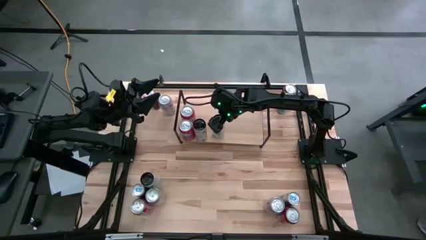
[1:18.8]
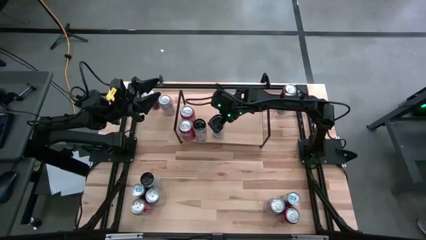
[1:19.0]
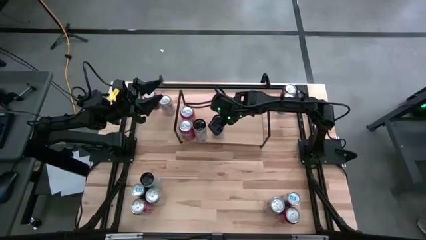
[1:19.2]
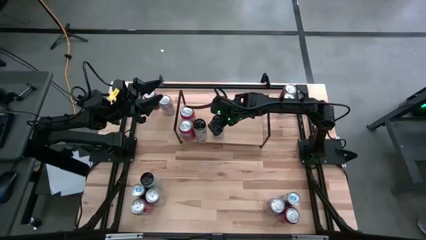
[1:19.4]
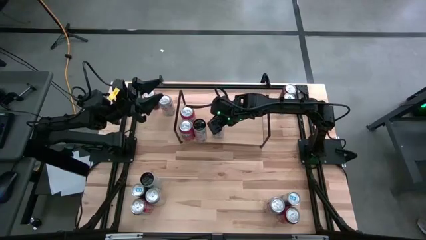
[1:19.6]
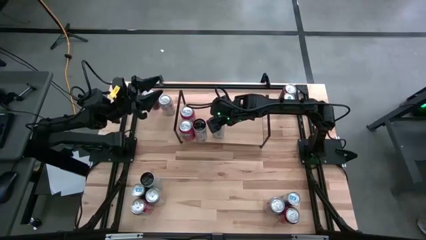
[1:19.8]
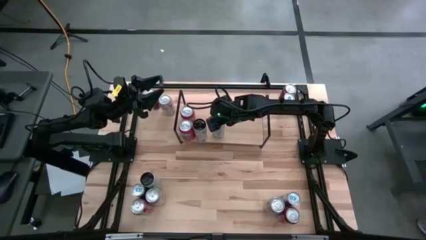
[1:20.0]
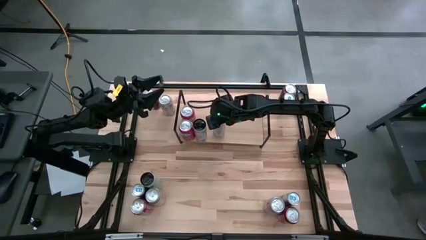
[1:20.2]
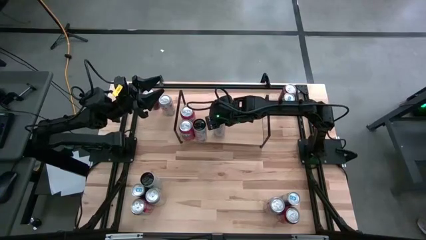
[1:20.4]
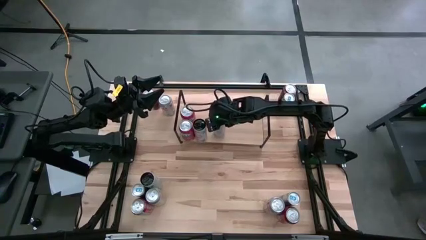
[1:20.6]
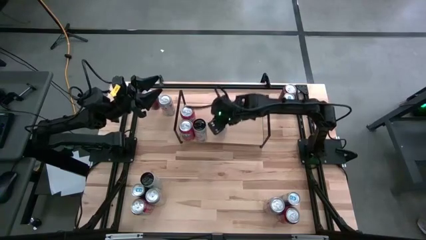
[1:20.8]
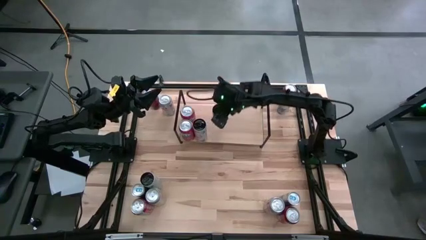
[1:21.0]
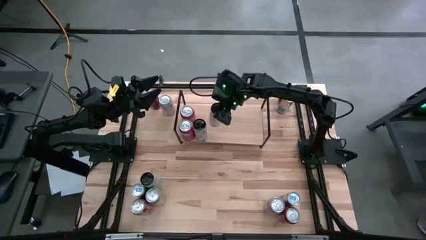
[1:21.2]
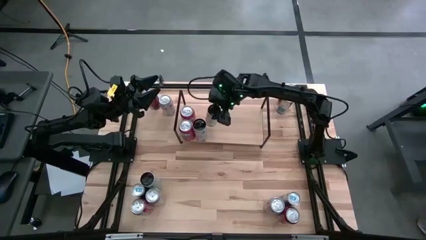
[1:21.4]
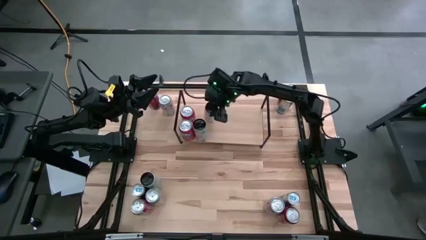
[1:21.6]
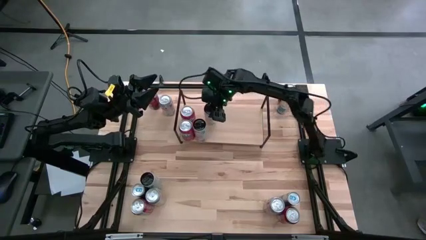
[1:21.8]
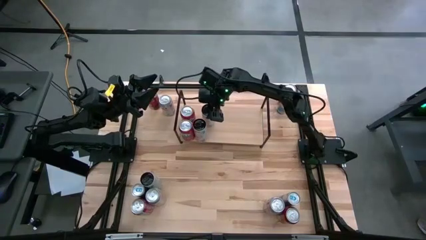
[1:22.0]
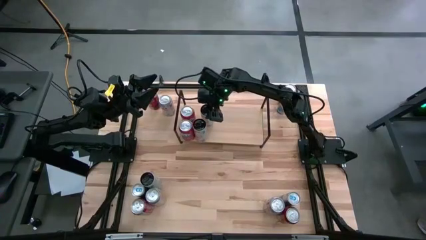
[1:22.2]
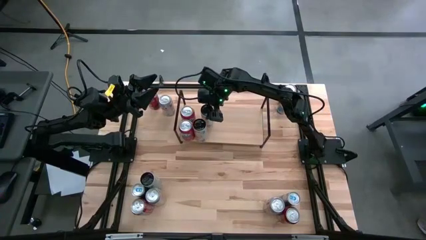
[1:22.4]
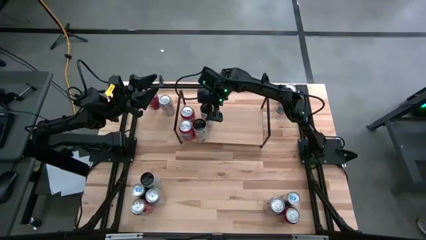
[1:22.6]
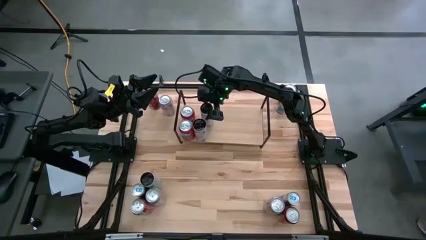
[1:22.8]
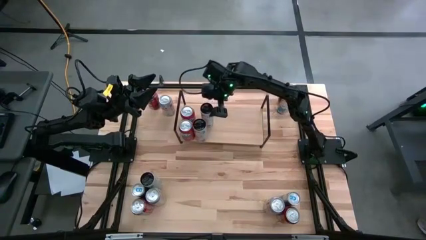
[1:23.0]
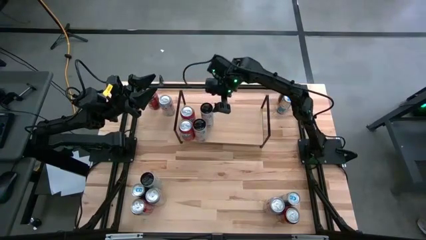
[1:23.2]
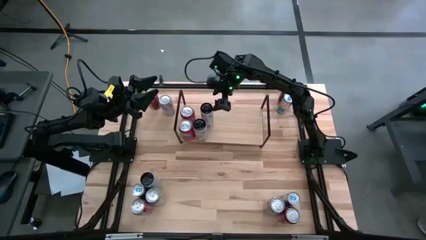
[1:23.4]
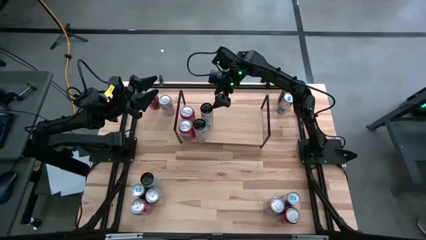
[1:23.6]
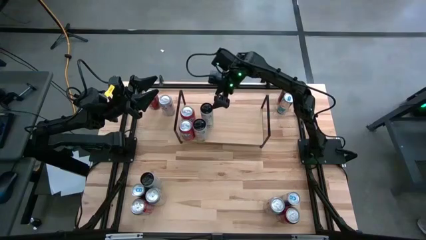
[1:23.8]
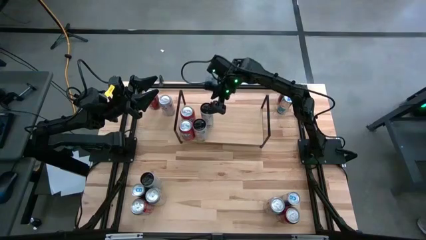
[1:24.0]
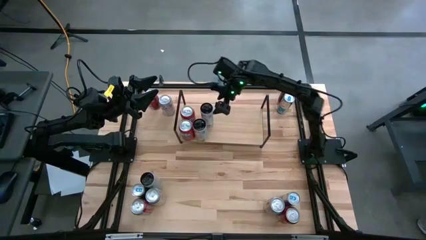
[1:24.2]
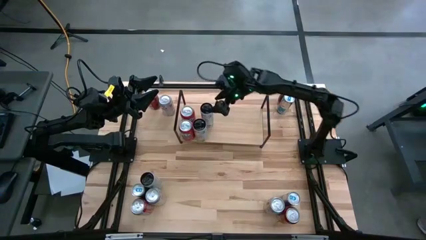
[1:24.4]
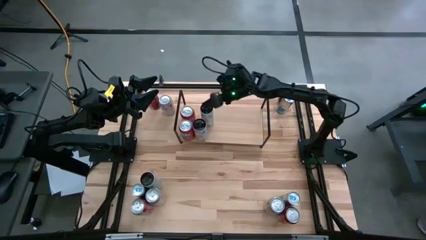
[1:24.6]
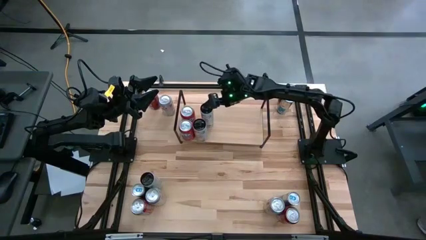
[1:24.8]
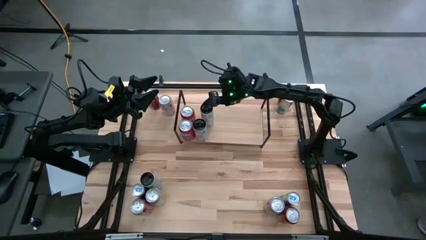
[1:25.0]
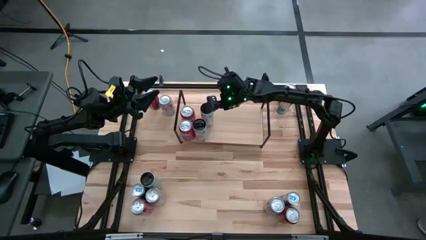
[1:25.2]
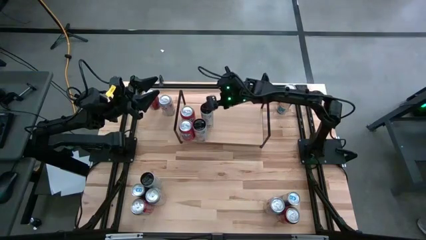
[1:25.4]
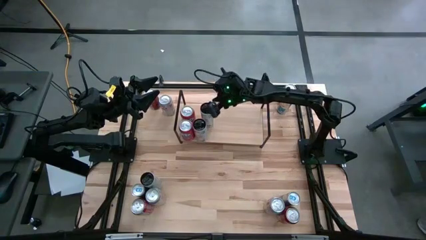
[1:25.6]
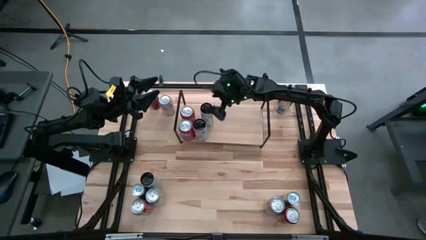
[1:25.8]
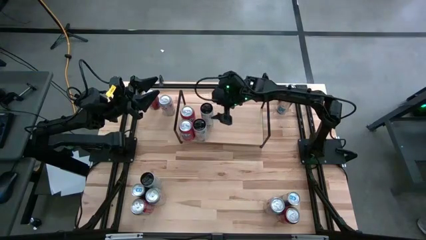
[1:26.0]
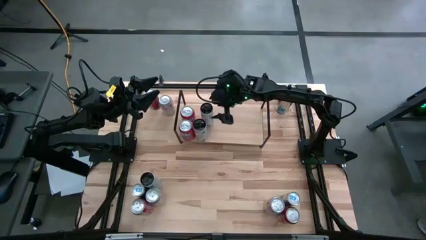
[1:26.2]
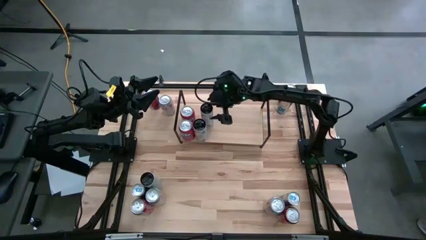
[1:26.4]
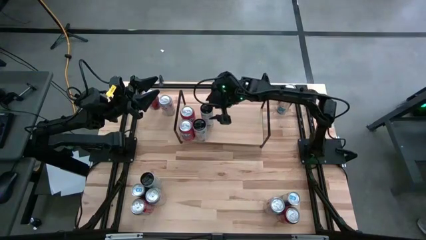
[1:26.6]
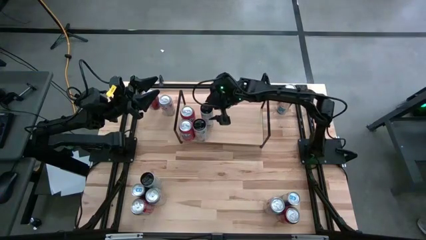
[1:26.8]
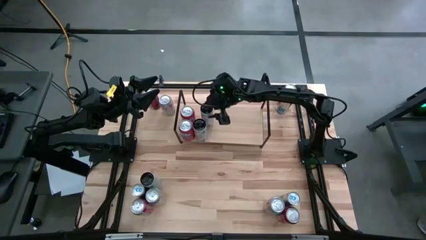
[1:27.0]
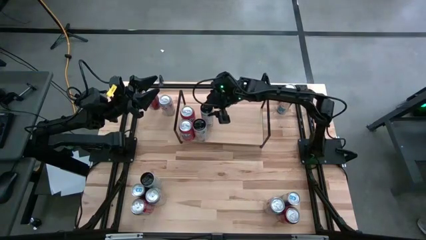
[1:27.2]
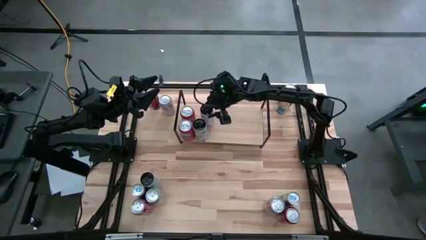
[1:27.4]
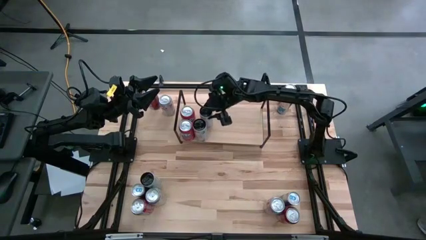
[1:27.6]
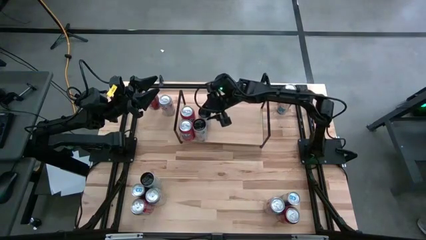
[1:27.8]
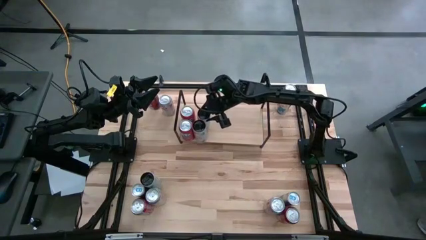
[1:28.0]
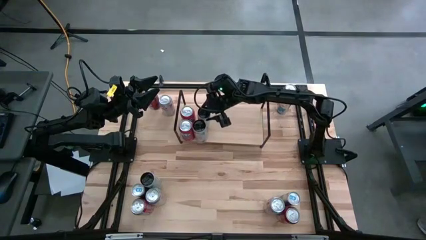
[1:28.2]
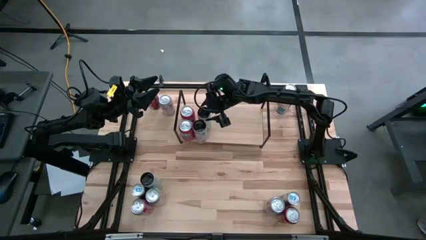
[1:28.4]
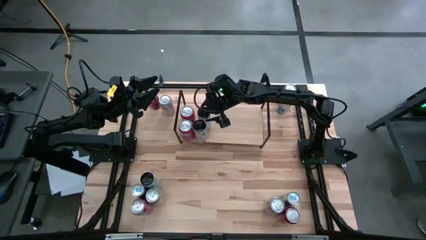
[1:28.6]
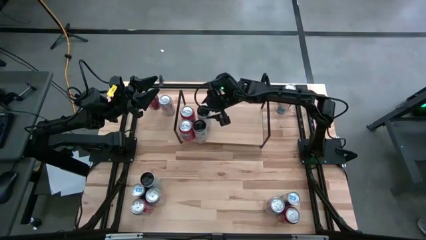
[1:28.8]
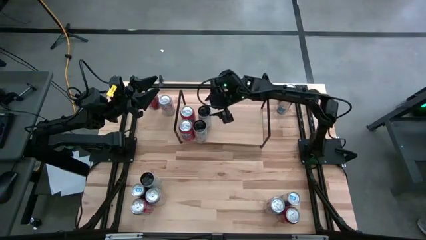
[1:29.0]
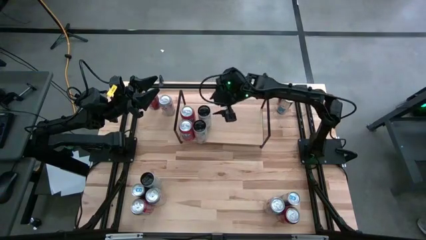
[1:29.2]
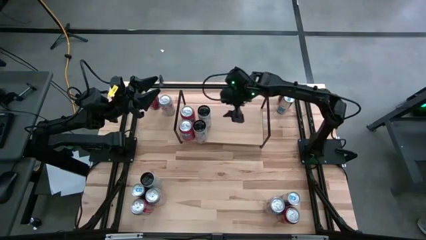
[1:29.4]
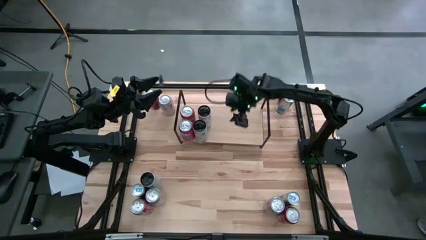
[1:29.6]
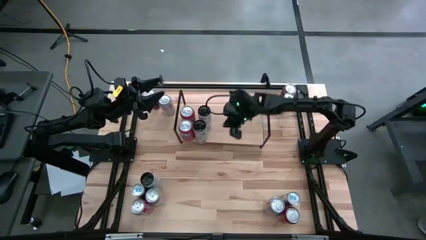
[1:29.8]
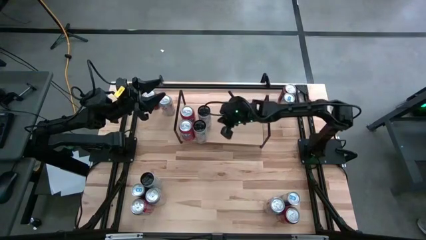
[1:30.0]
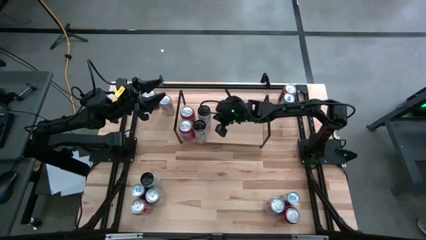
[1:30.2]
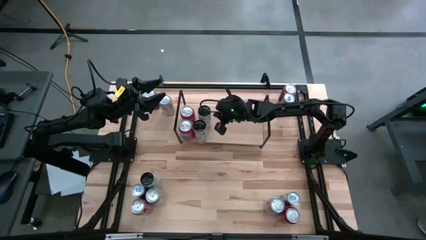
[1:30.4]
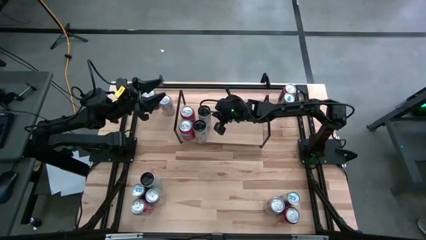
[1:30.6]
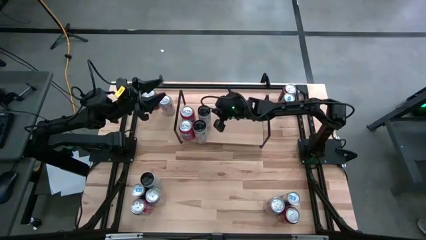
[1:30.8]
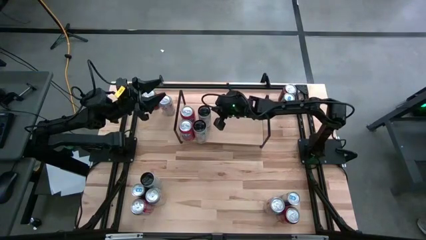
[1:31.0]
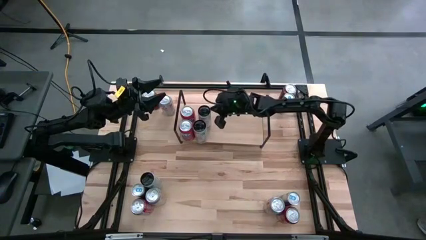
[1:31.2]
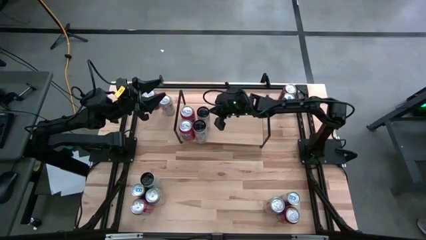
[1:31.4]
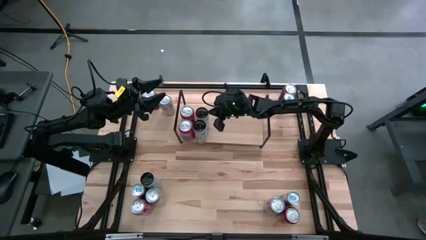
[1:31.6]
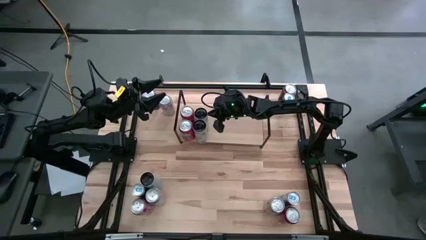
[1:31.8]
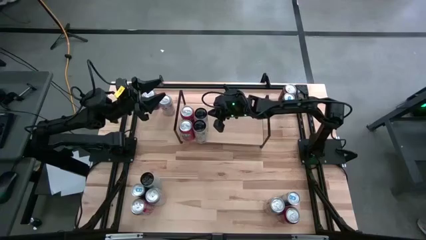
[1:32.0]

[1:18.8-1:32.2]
Task: Place canned beverage on shelf
Put the top white-pink soda can on the shelf aligned with the other white-pink soda can

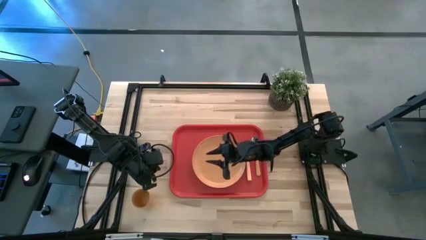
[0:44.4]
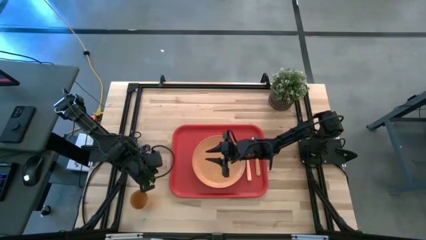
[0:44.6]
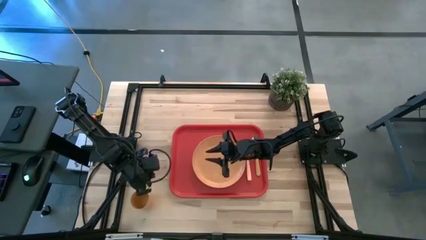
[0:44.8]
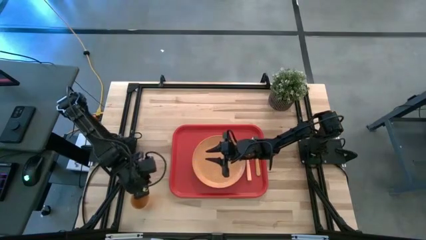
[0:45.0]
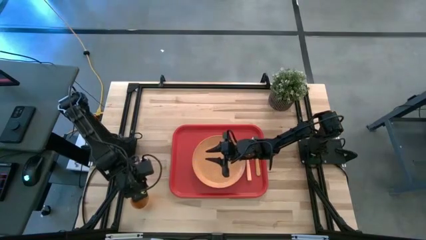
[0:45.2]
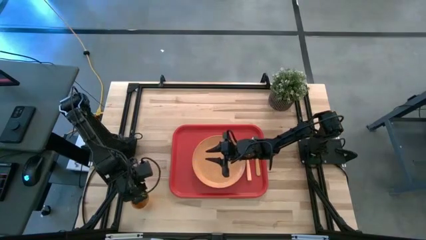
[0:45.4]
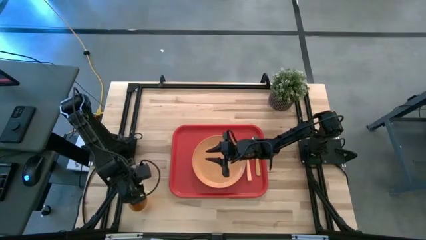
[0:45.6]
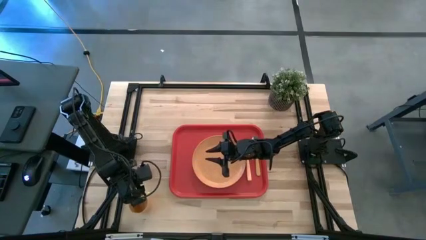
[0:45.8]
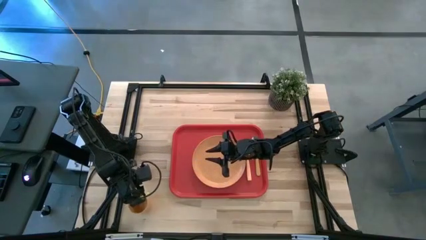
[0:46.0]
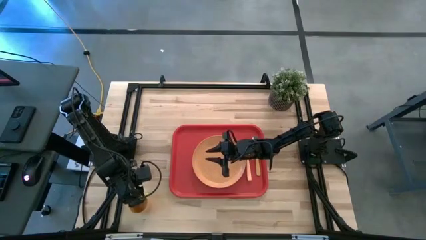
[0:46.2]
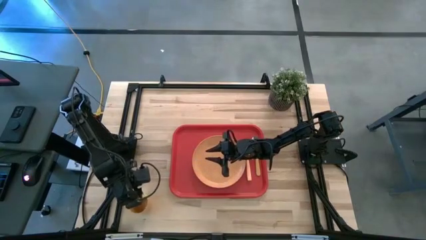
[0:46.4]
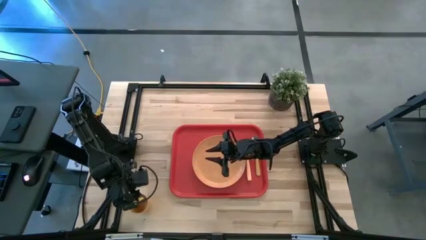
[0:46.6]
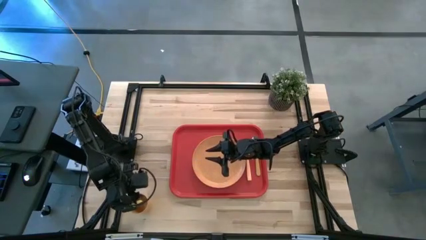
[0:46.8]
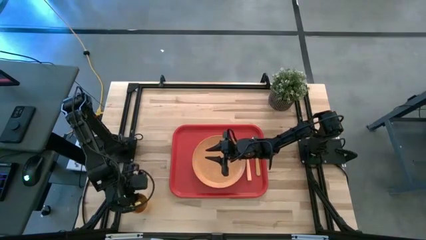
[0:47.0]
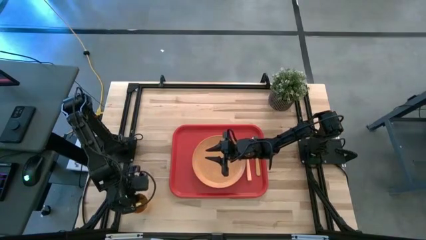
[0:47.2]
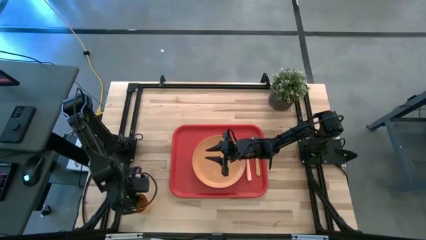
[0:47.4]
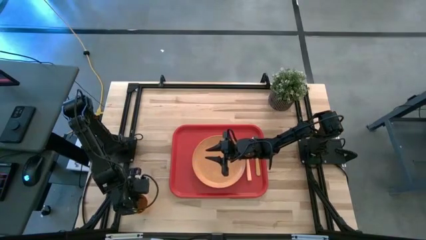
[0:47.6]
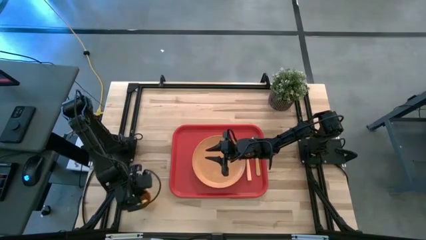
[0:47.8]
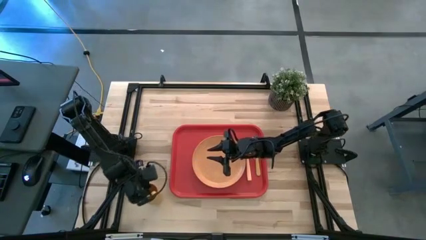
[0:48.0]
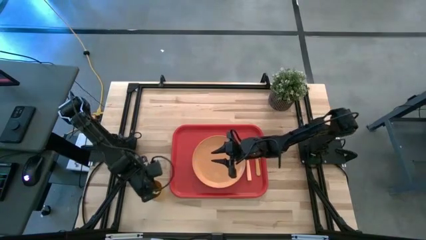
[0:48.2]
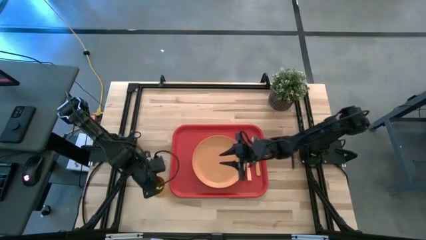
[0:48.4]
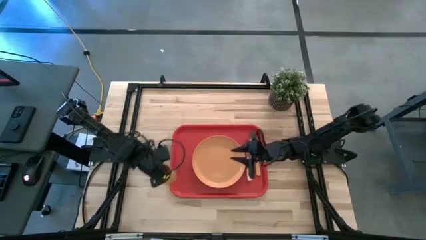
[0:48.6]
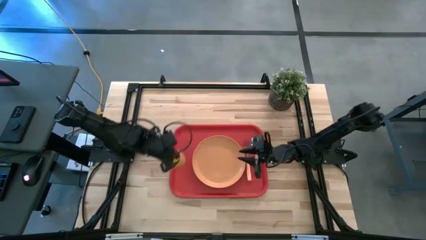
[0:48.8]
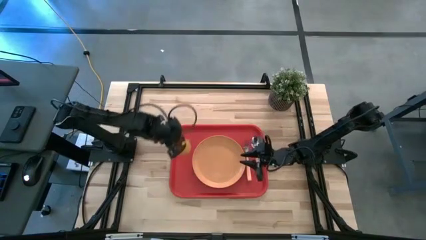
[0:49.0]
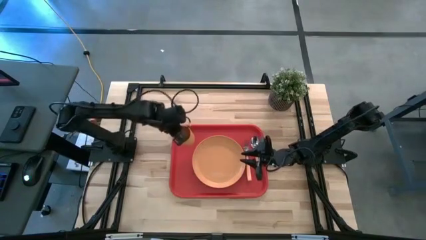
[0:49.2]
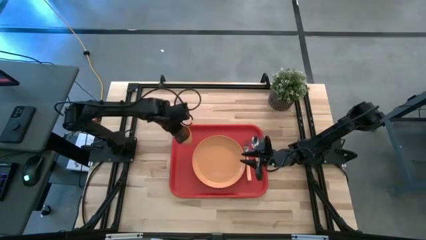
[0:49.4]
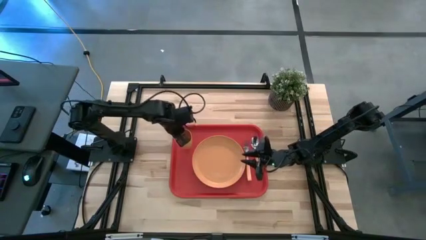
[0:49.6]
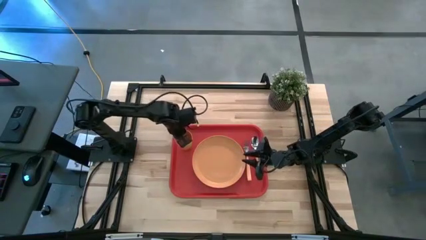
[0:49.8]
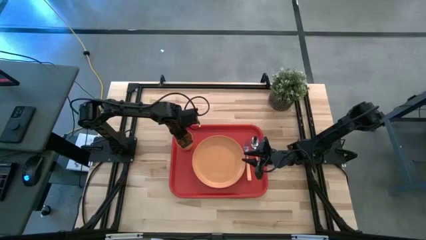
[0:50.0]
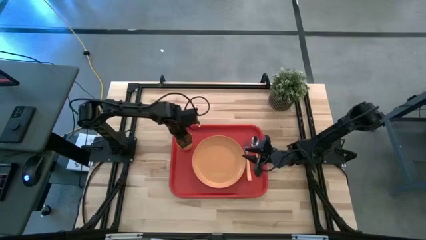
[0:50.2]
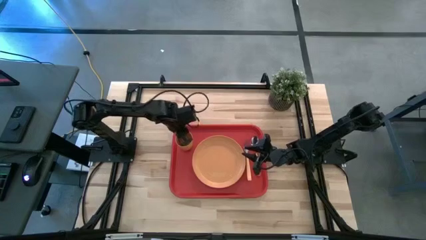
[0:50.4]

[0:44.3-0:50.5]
Task: Pick and place plate/cup/fork/spoon on tray
Put the orange cup on the red serving tray to the top left of the orange plate
